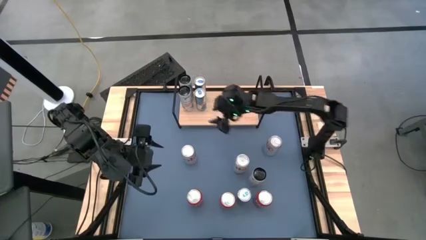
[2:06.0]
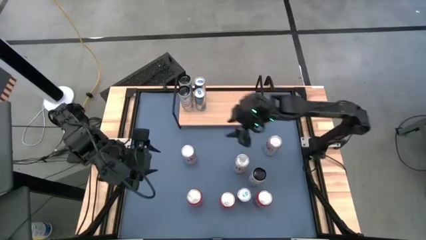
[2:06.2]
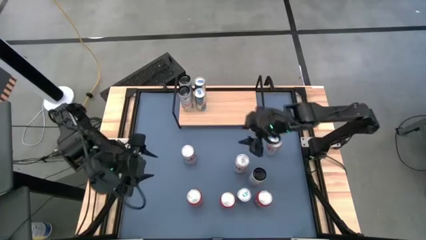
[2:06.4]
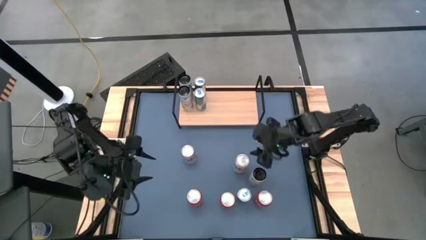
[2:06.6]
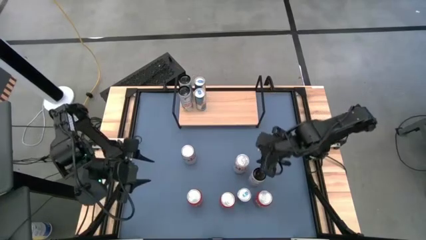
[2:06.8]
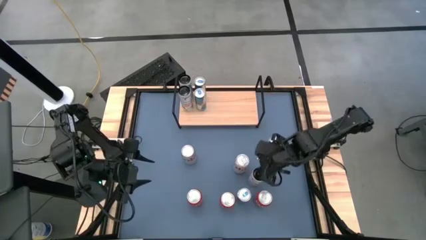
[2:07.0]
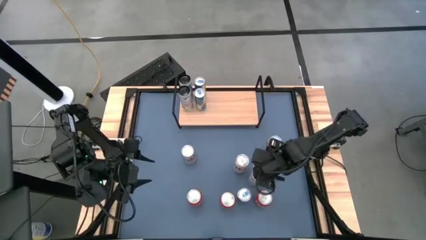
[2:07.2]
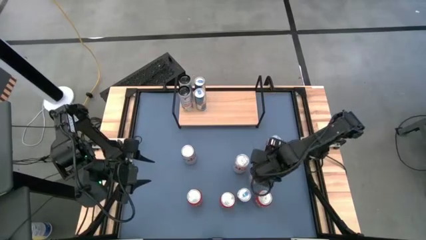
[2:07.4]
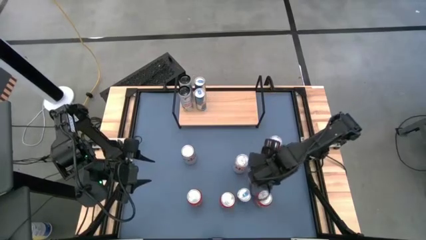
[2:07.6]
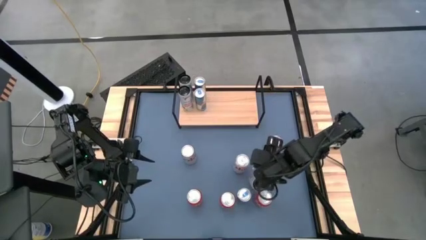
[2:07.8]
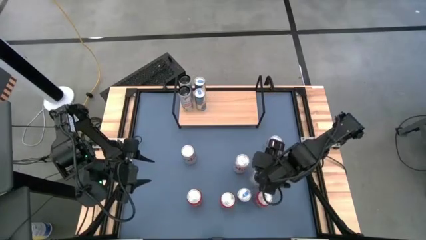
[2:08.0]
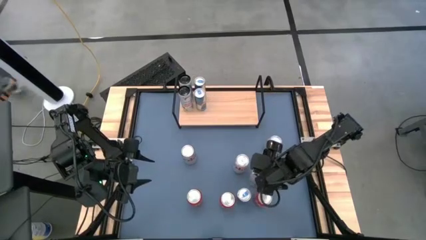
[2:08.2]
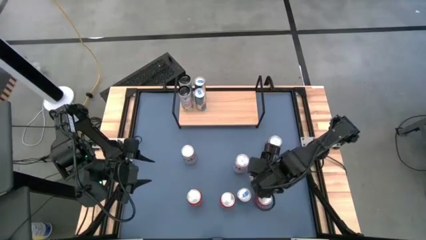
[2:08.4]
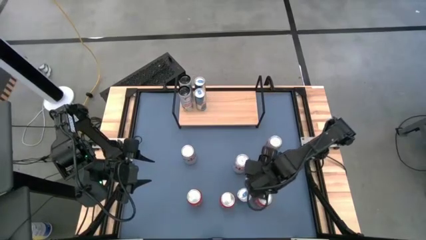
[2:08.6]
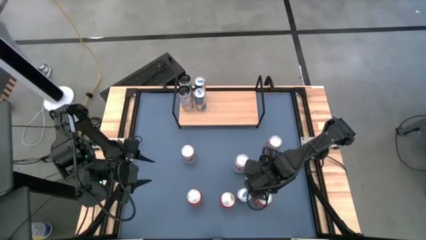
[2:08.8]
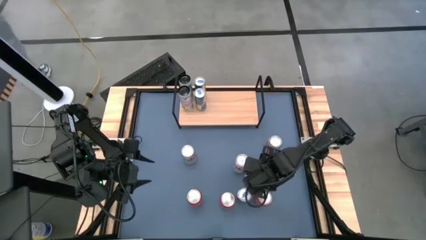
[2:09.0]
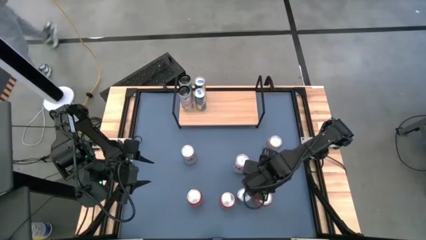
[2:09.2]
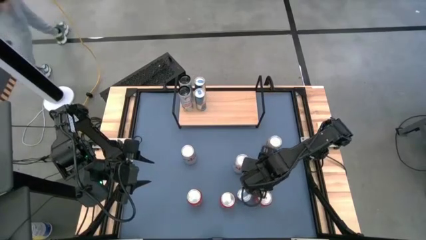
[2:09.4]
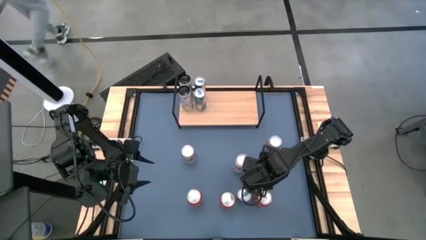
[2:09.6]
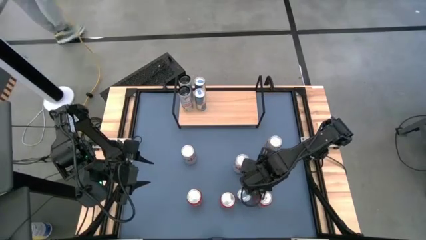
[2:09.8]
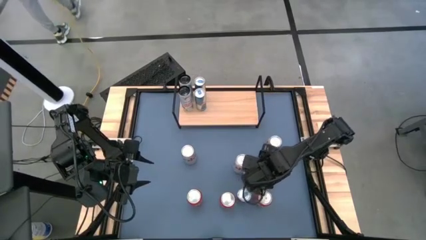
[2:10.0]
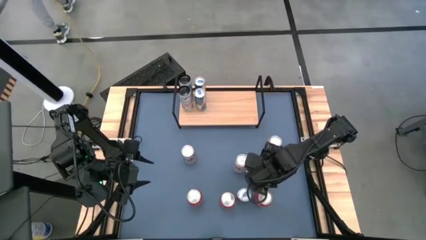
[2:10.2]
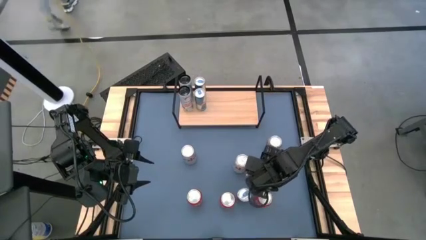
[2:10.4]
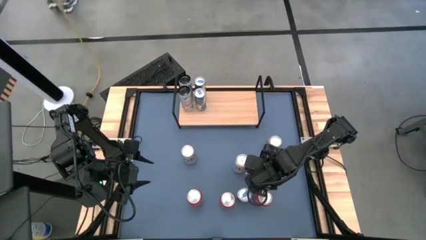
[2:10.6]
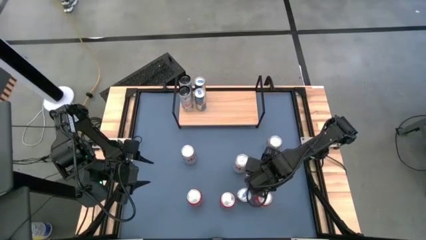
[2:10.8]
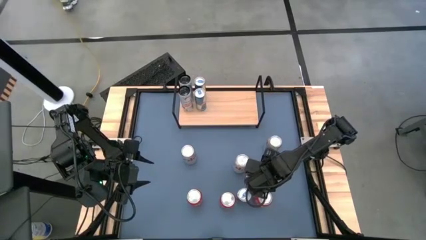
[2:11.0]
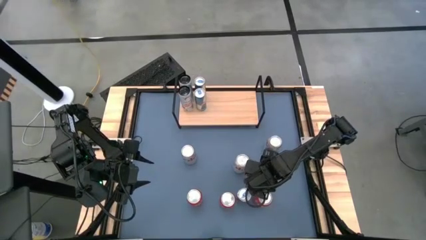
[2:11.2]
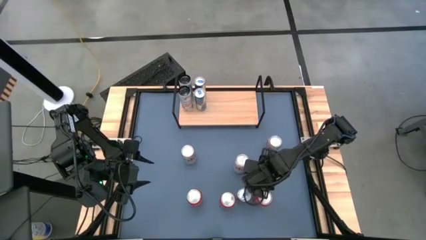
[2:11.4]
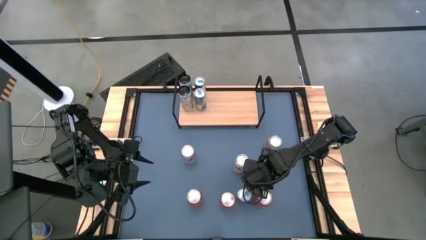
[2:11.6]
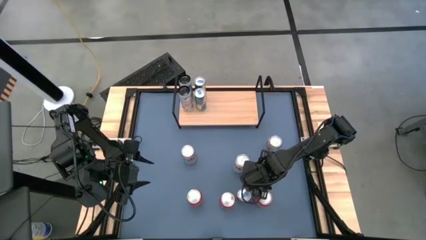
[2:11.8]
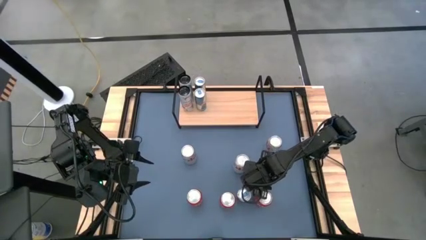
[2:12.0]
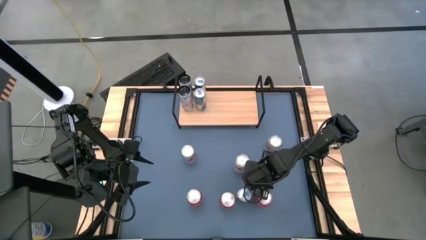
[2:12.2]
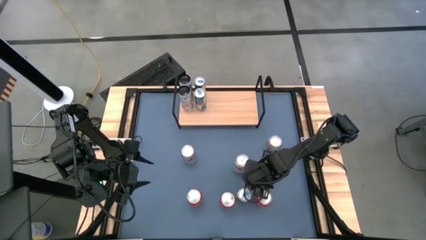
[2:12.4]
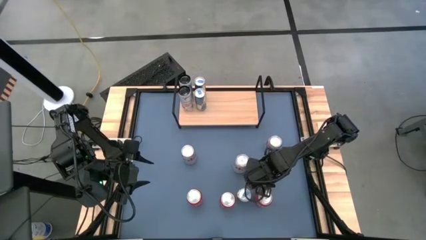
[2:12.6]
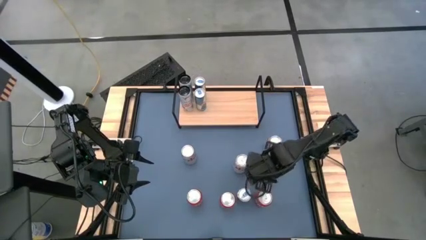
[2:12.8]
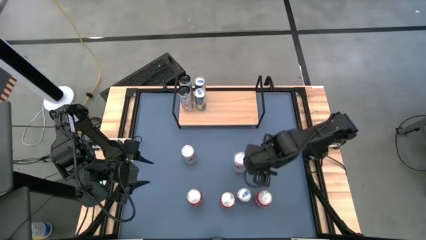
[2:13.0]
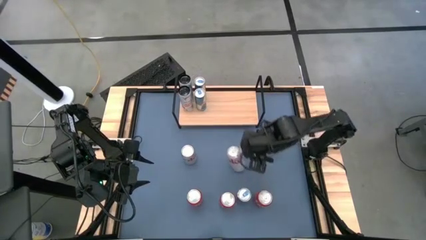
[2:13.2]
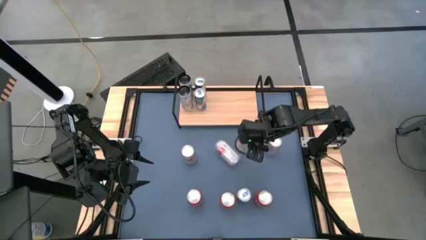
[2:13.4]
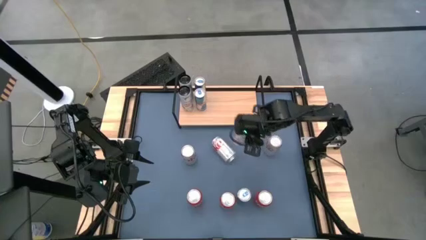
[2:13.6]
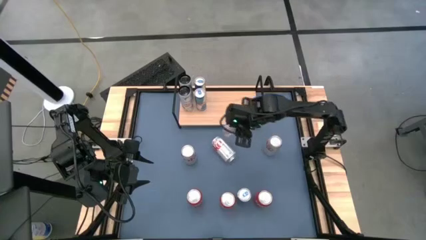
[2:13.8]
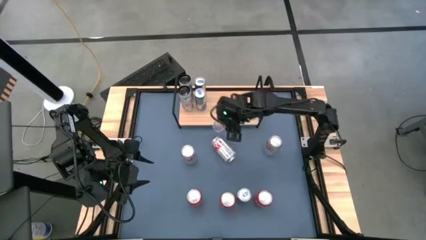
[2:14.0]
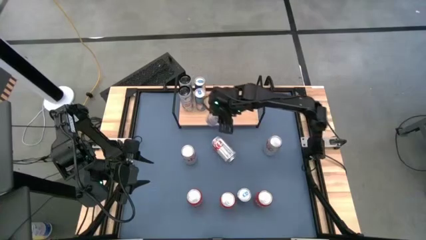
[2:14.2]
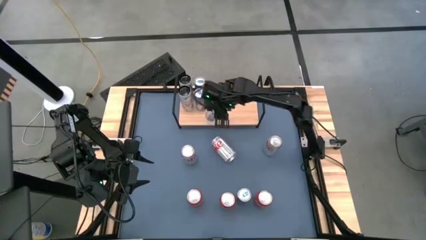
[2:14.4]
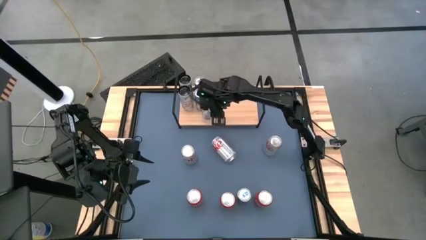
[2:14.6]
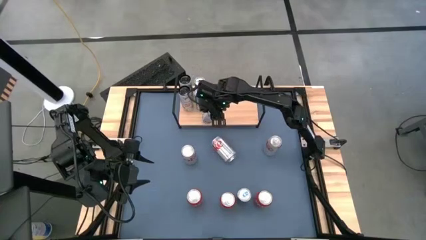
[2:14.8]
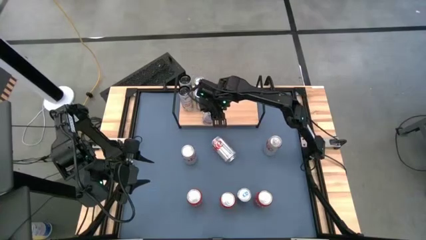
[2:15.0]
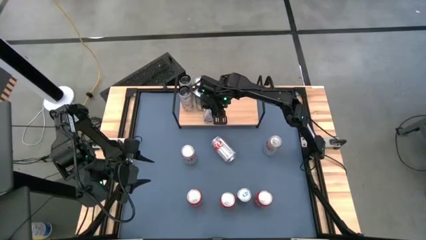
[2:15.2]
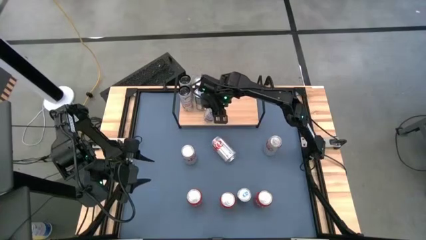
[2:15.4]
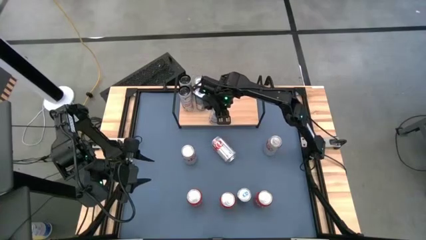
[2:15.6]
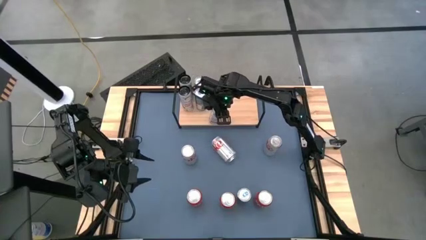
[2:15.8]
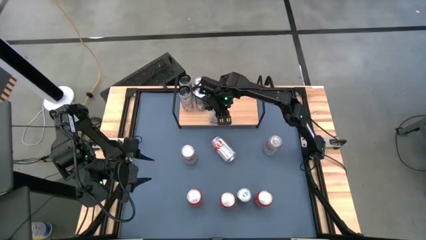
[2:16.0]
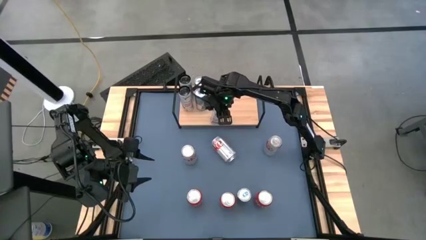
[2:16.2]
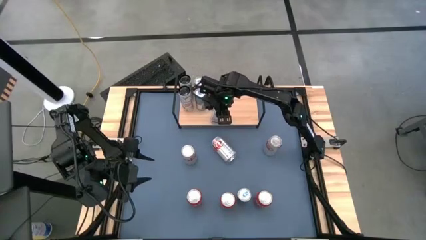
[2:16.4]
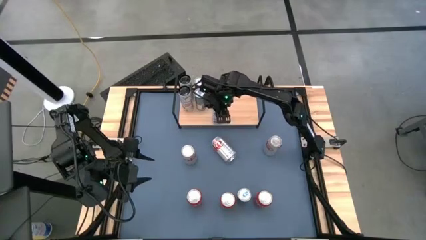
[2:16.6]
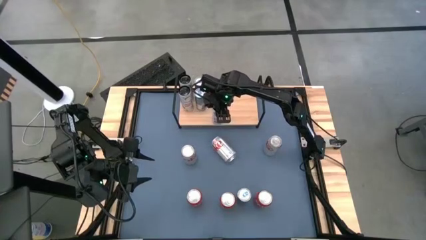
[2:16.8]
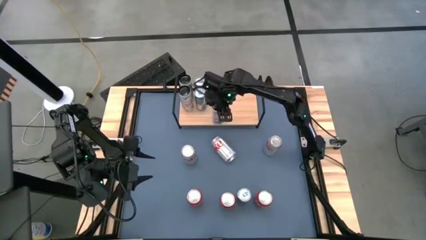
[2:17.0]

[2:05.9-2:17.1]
Task: Place canned beverage on shelf
Put the white and pink soda can aligned with the other white and pink soda cans on the shelf

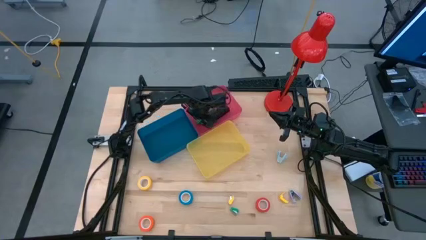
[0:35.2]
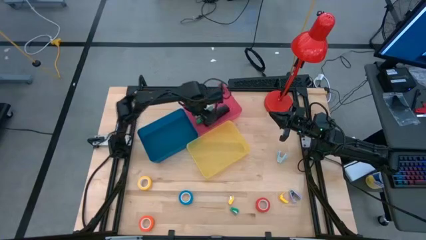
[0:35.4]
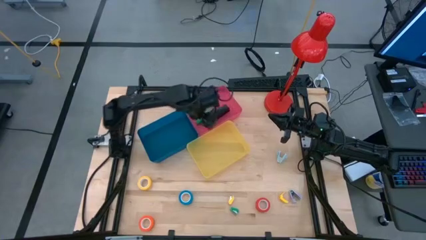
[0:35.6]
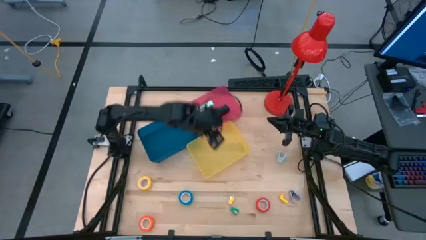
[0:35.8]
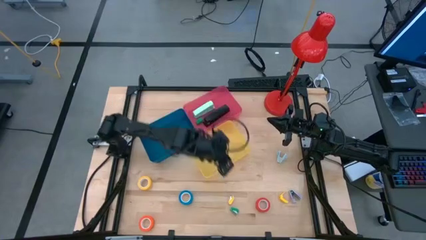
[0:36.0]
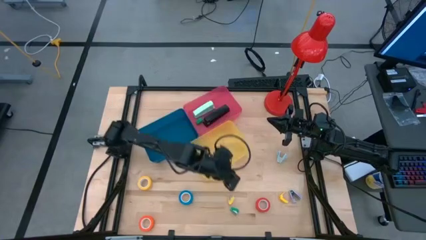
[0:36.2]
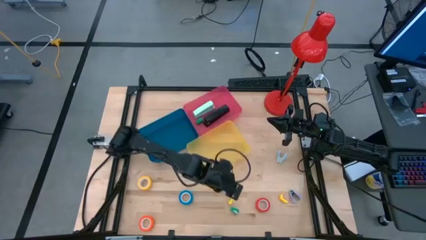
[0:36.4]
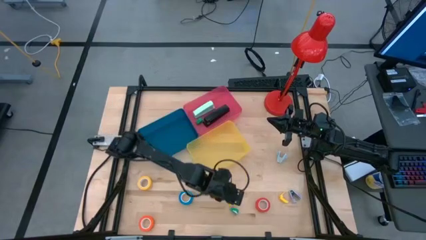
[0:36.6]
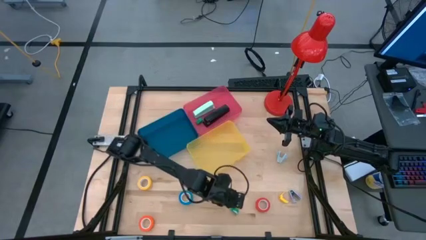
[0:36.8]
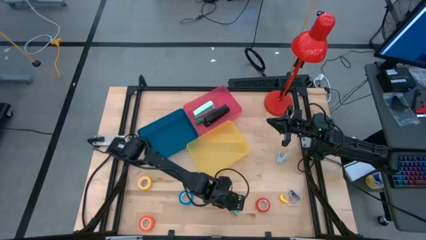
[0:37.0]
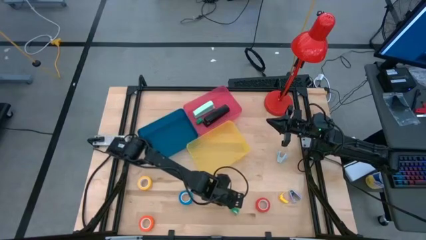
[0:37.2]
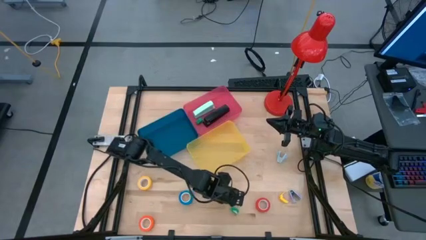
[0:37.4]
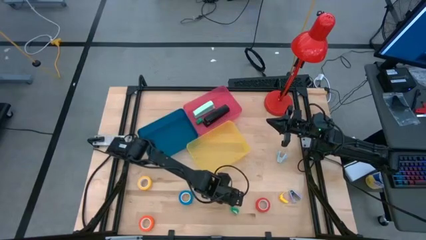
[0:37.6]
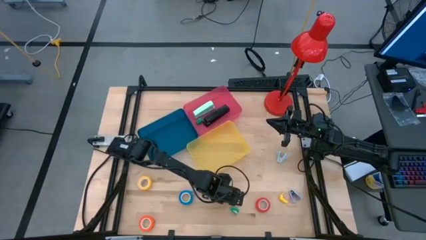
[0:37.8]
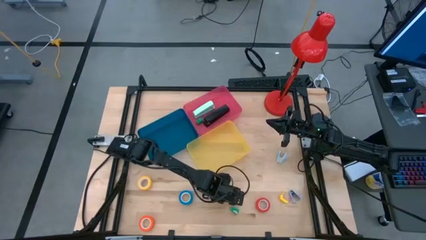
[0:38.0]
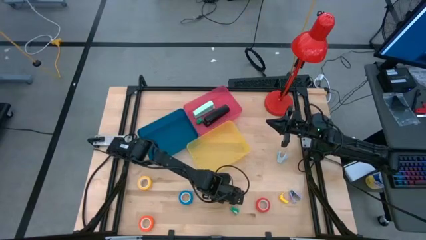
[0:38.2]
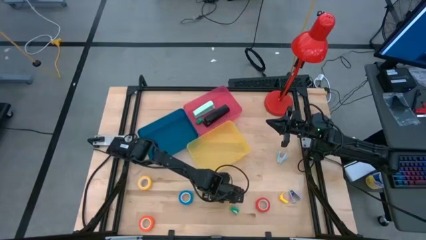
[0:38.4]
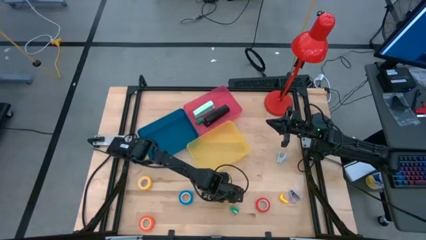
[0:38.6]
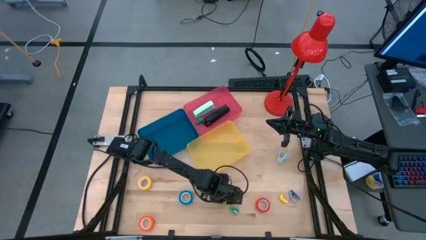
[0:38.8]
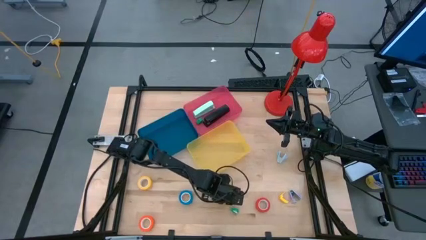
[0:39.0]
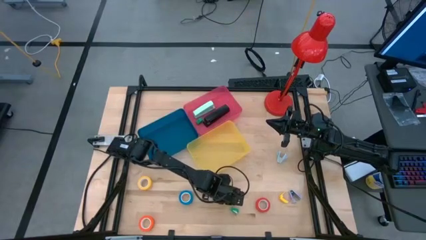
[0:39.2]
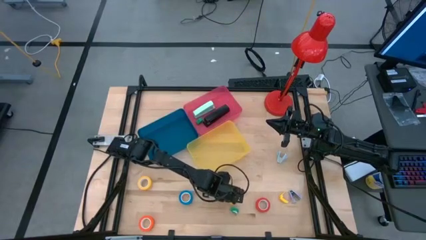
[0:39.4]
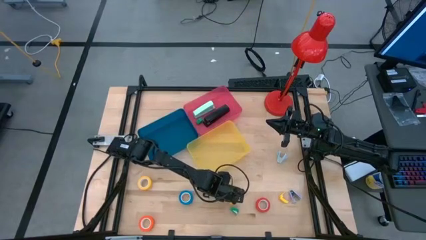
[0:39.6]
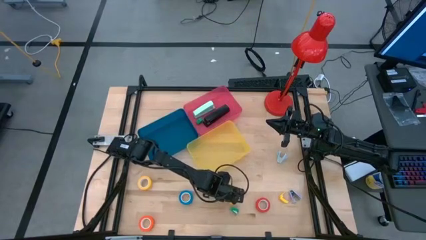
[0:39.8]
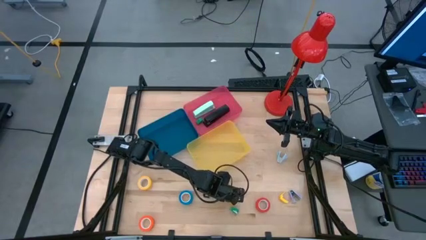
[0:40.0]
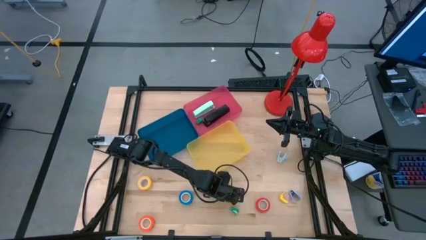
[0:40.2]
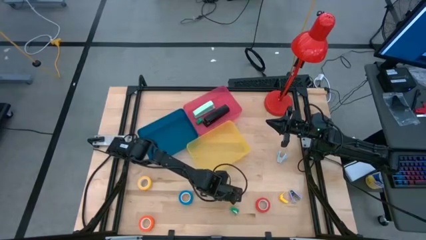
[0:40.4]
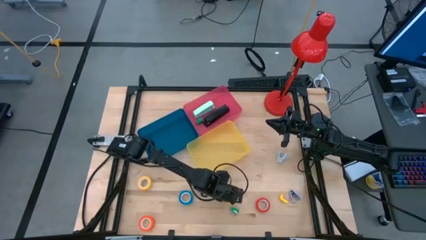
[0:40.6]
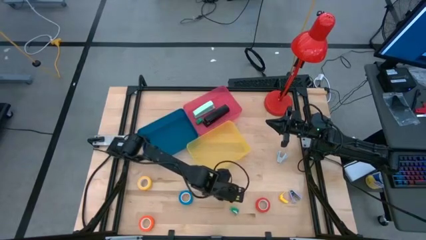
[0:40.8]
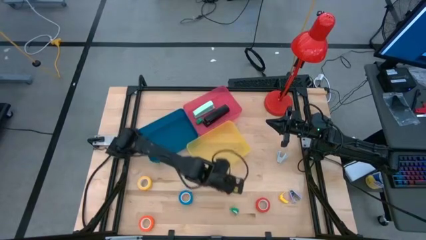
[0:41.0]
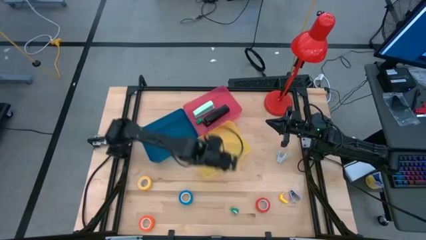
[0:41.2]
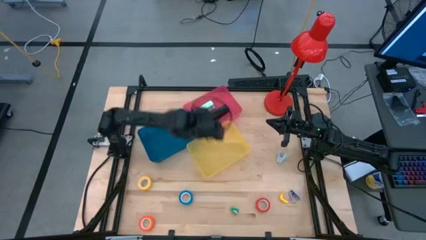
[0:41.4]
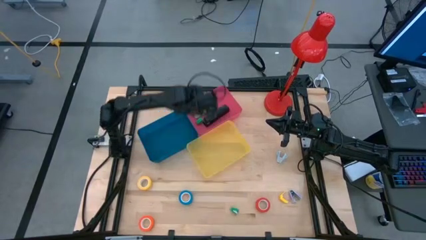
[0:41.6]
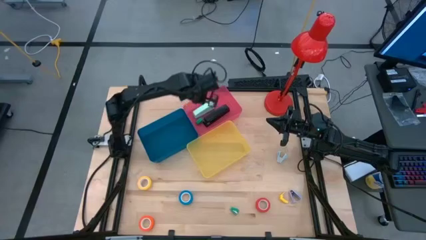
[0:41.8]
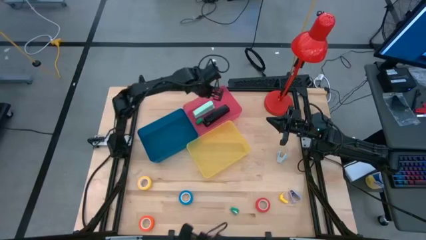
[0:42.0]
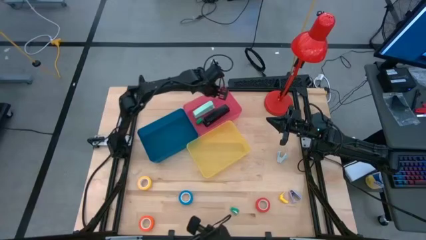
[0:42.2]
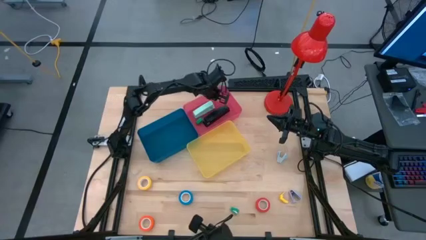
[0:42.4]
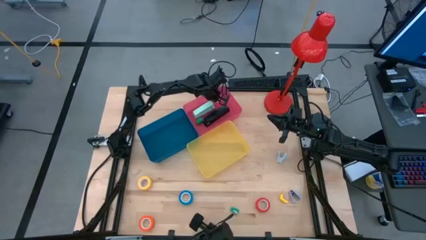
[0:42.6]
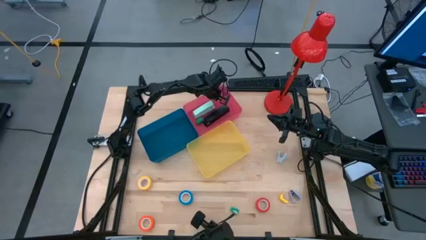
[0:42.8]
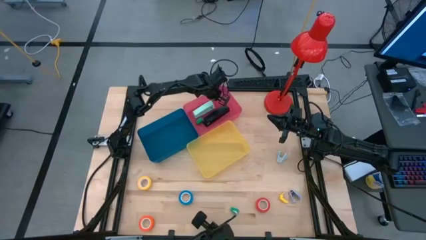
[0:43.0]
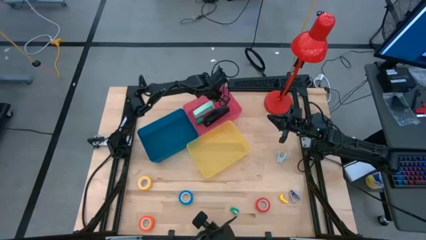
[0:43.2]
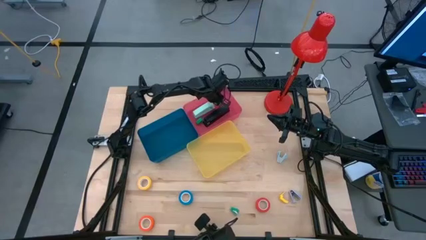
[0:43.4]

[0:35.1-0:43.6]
Task: Pick and place Stapler, Stapler remover, tape
Put the left yellow stapler into the red bin
